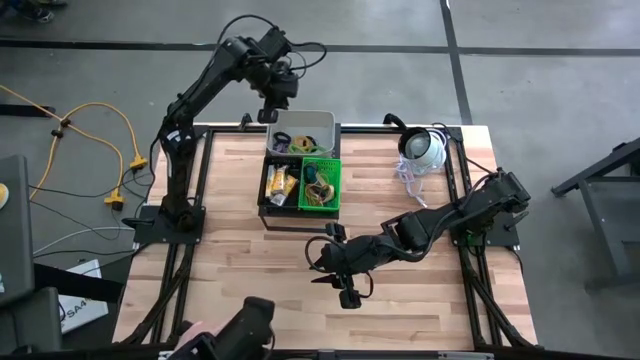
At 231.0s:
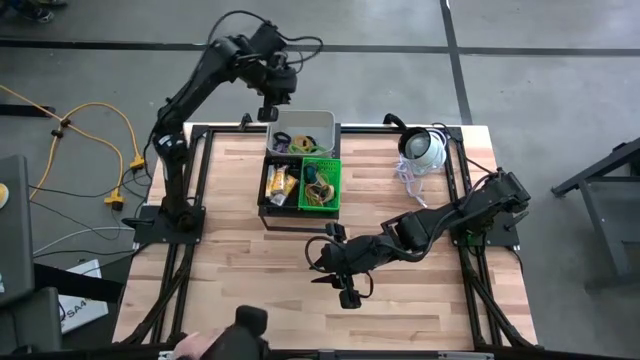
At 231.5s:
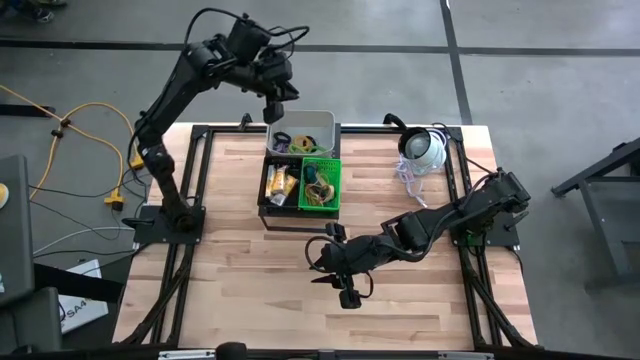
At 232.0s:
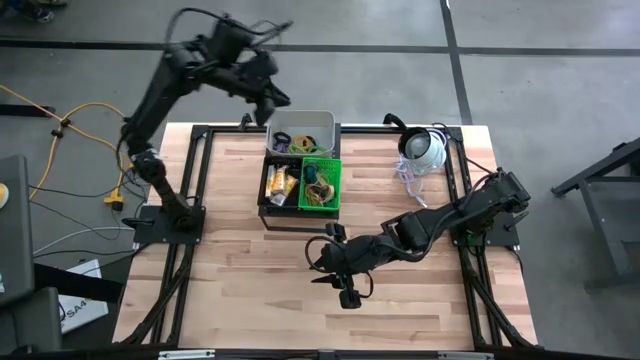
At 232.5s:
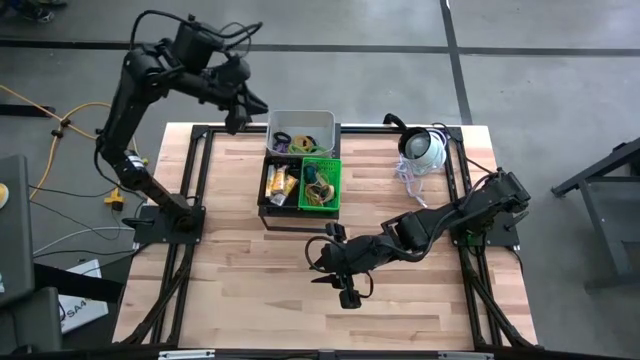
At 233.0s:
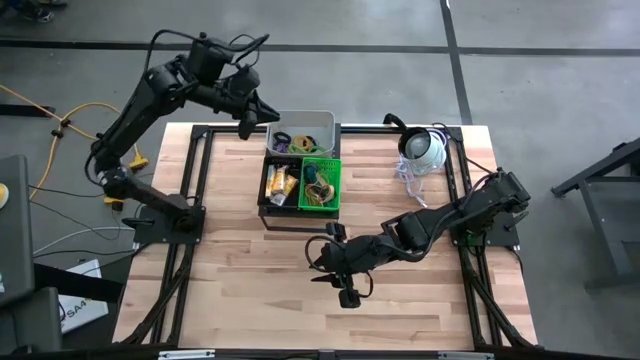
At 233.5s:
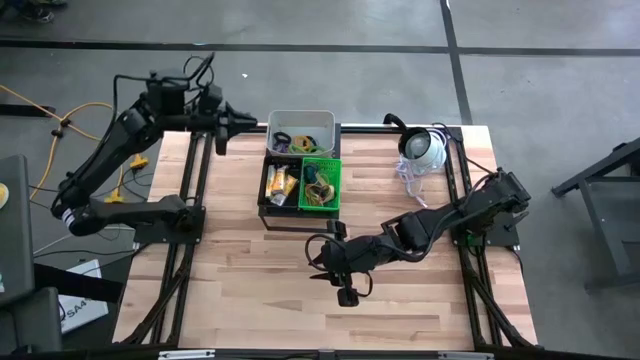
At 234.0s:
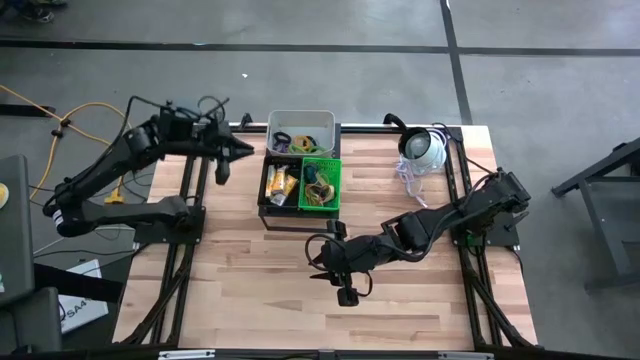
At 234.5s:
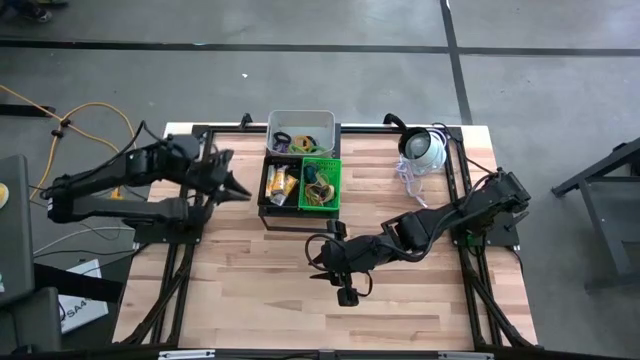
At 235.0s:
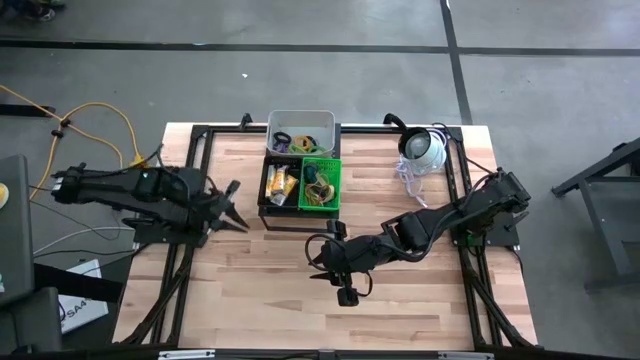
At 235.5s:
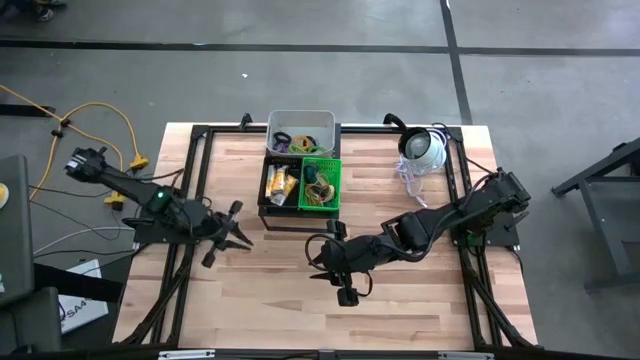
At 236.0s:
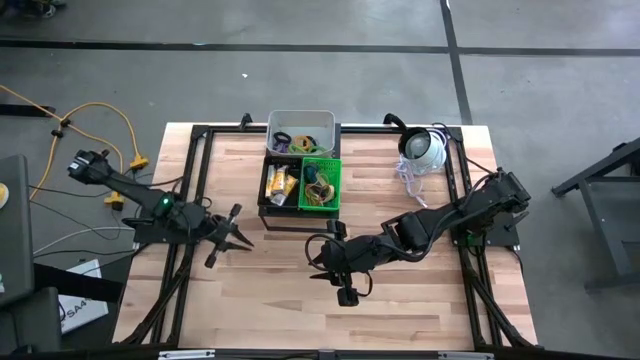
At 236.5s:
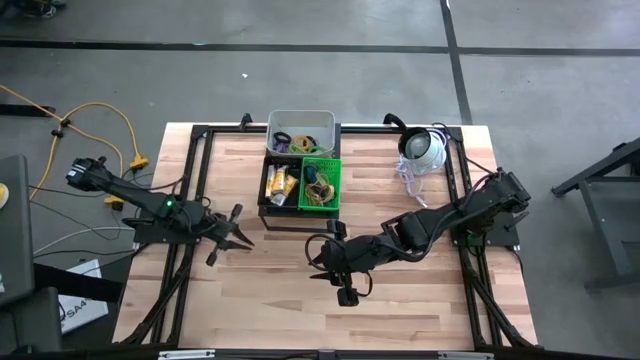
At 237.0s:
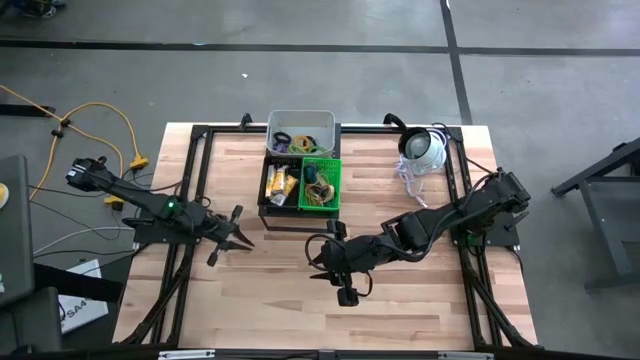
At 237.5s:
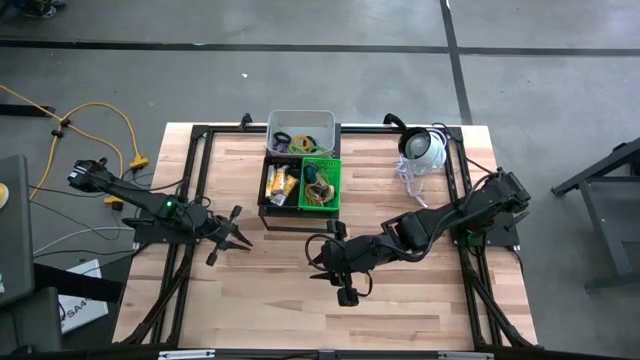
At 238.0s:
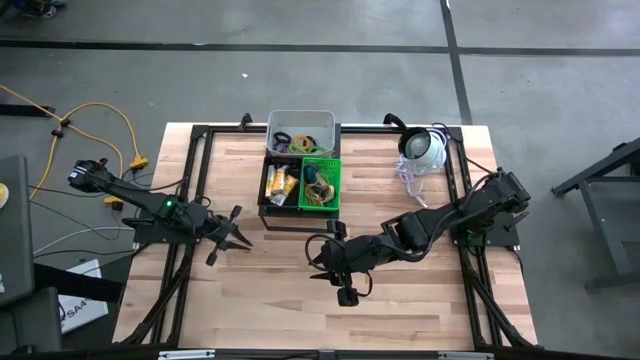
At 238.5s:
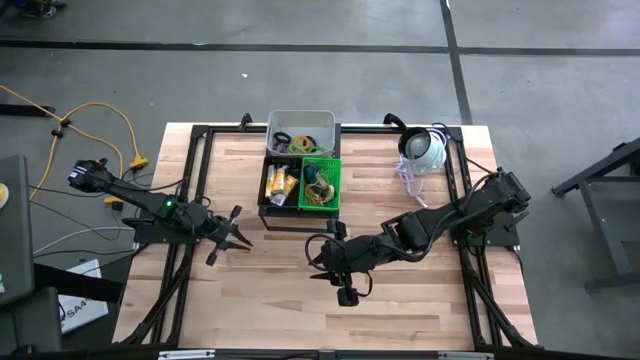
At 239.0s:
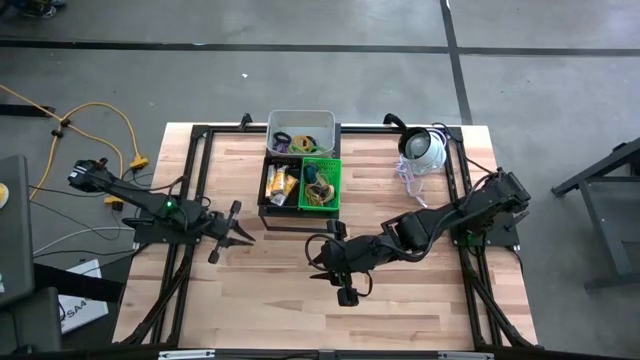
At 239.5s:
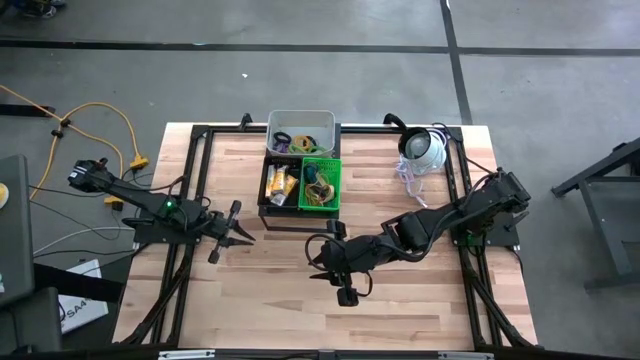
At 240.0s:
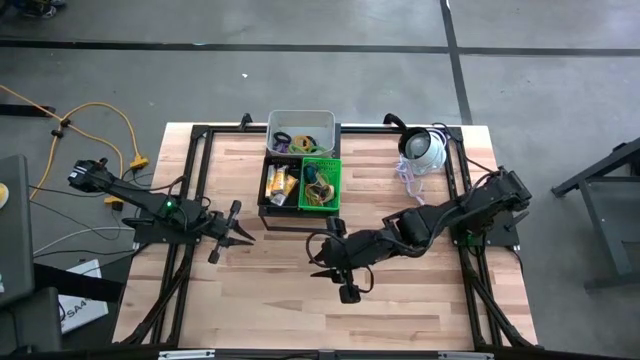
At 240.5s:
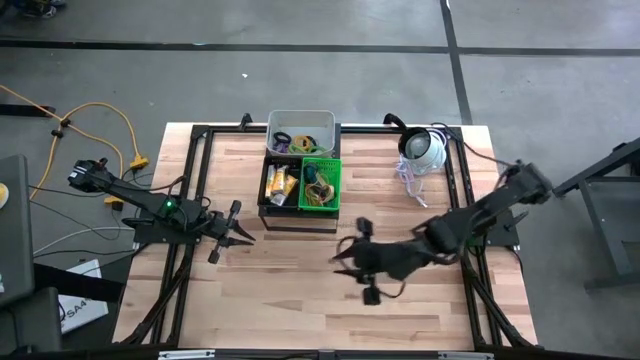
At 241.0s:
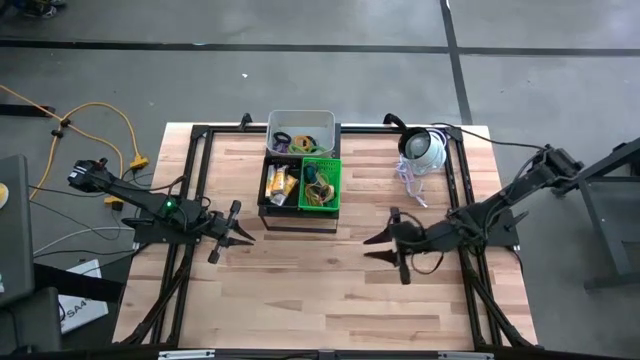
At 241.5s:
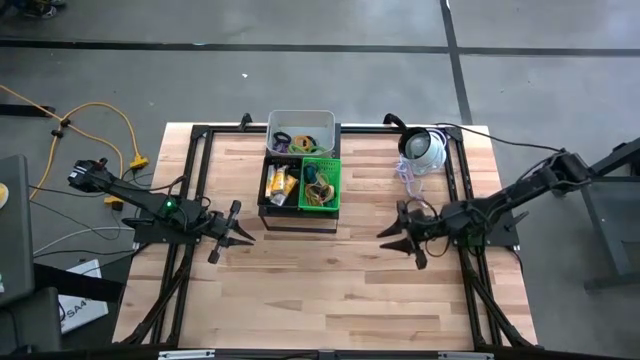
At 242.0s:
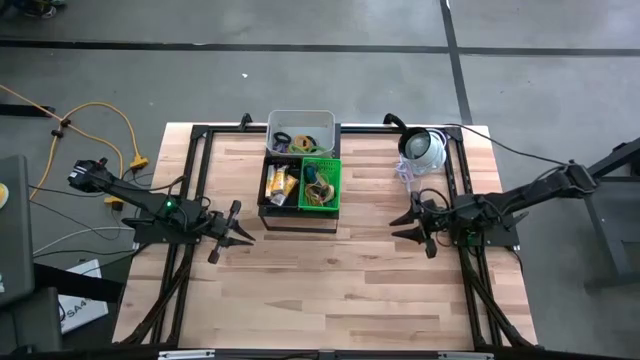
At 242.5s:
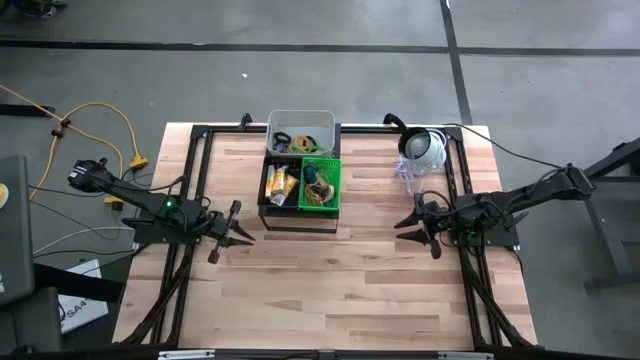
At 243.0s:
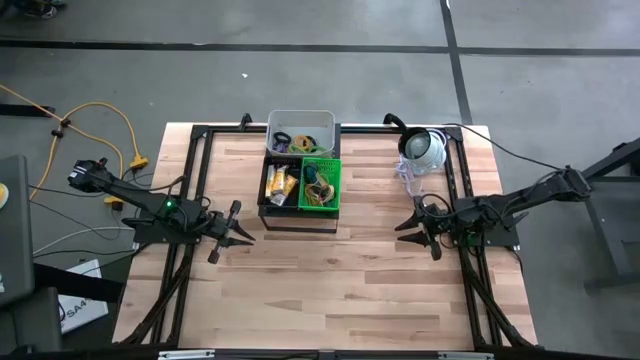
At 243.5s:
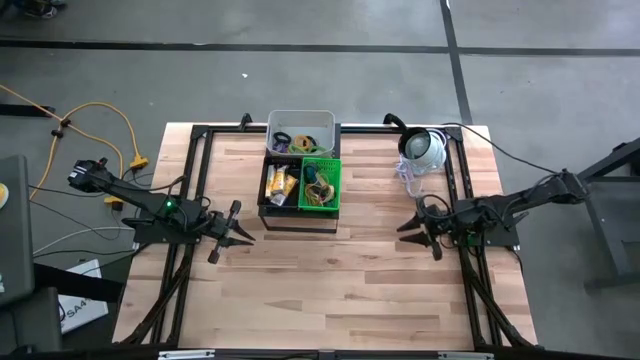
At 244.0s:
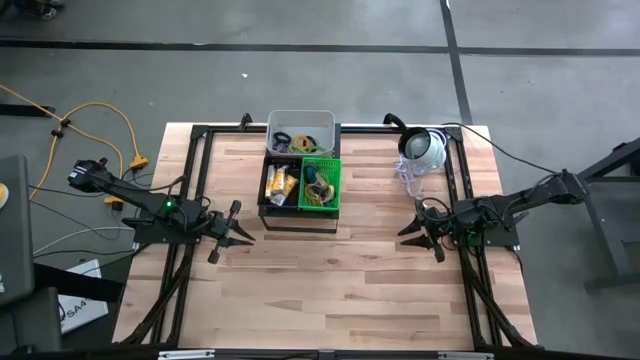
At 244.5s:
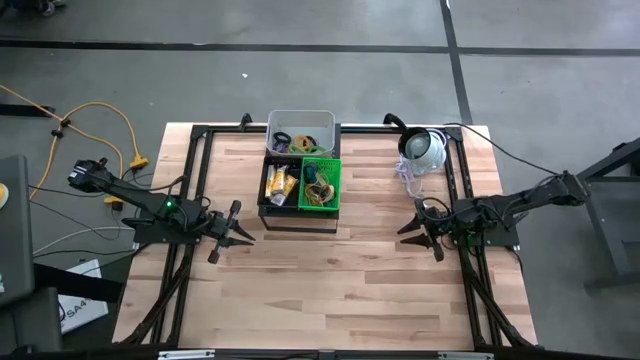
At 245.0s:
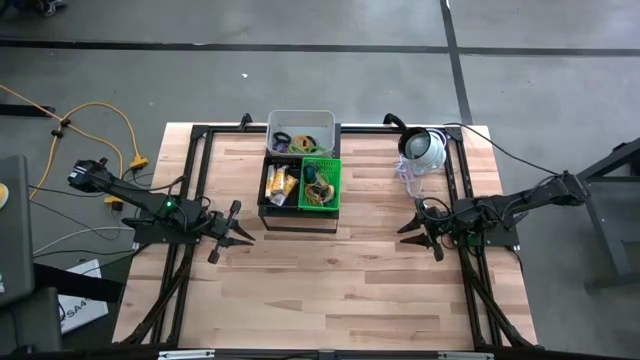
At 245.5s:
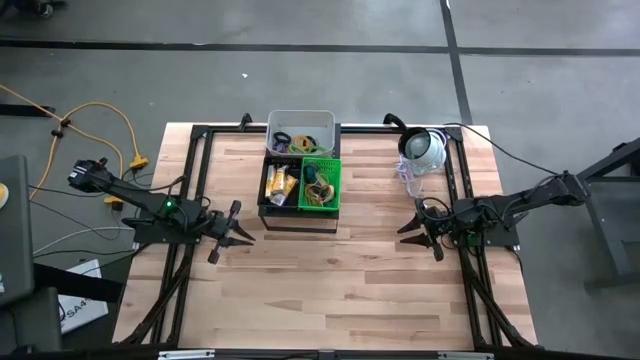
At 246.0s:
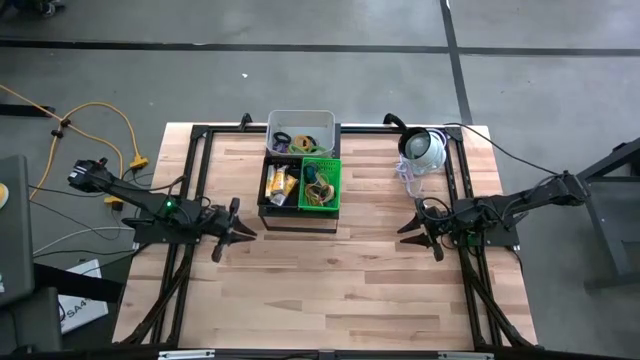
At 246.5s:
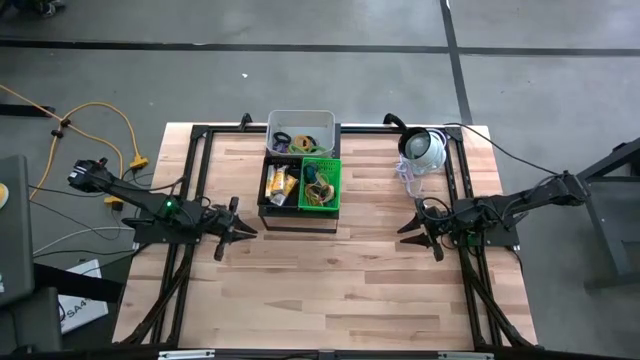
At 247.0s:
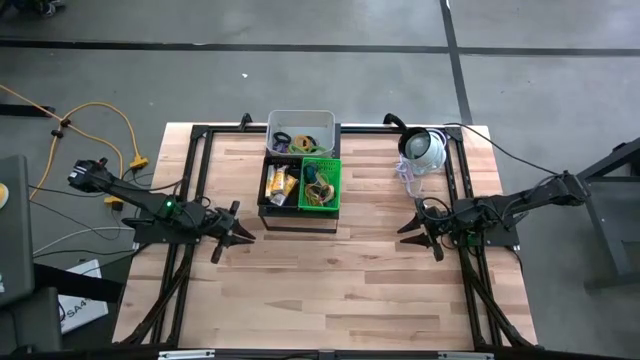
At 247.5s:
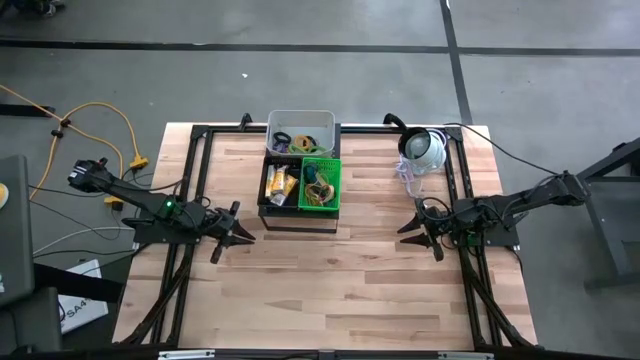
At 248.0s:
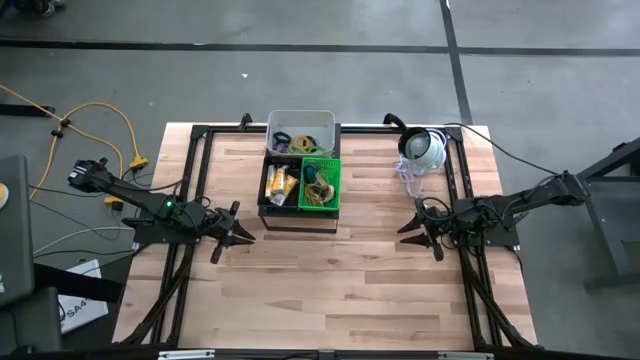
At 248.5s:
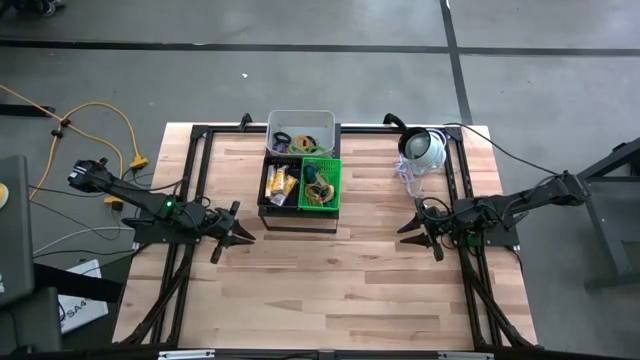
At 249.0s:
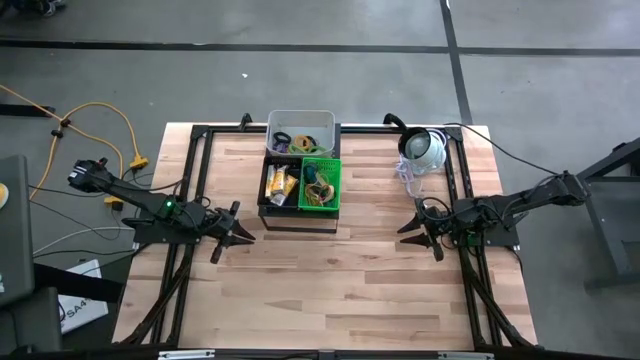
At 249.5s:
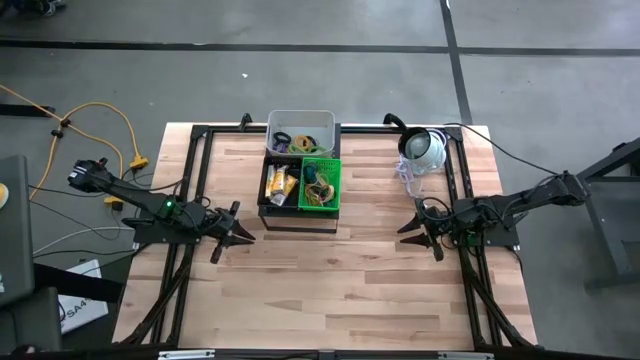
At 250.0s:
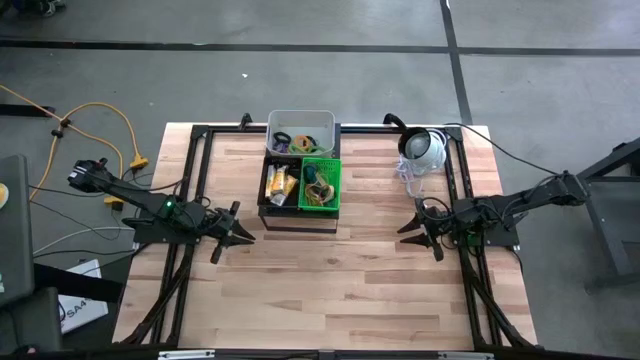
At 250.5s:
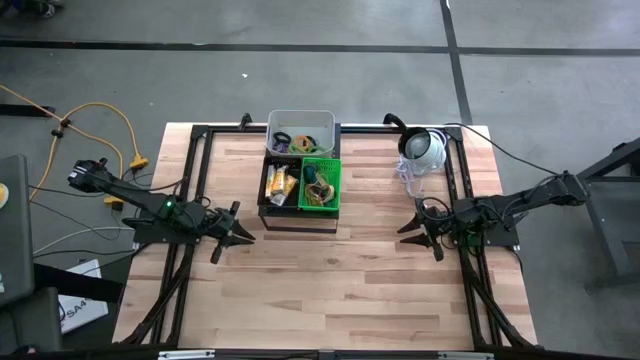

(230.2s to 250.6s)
Task: Pick & Place Office Desk Supplies
Return to Home Position

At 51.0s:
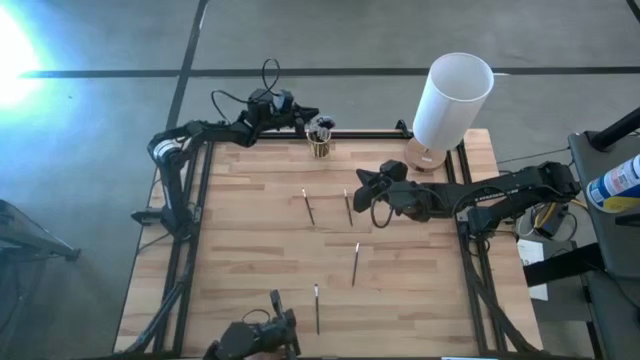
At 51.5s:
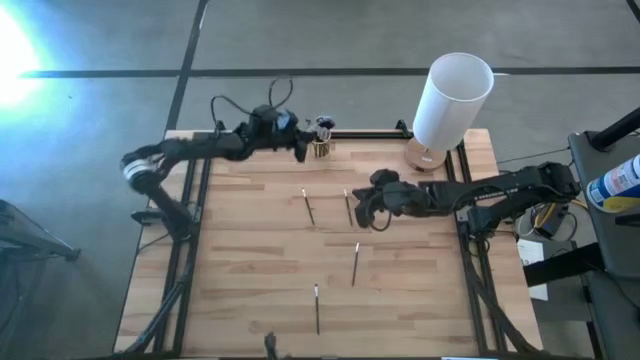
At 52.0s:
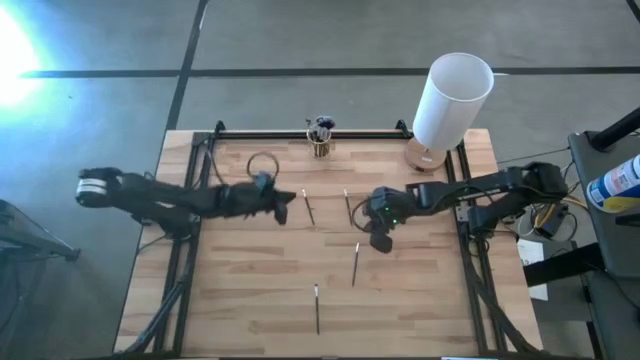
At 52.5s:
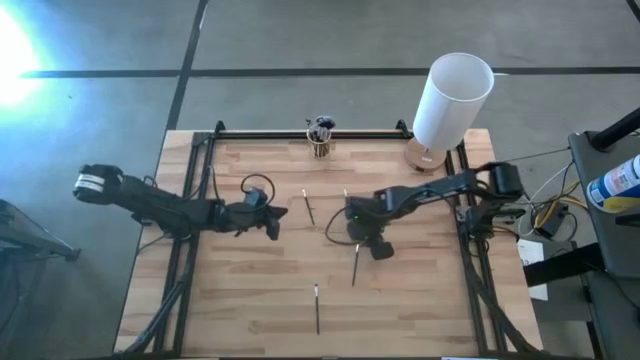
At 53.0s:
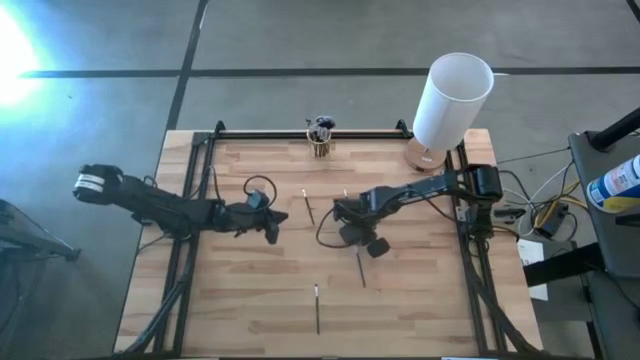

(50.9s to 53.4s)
Task: Put items in baskets/containers
Put the black eyeshadow brush into the yellow pen holder
